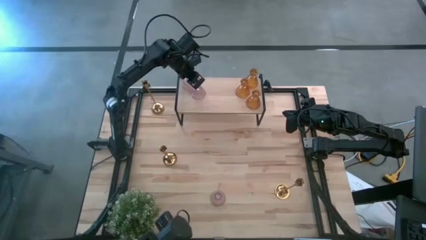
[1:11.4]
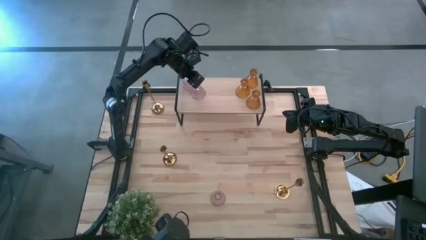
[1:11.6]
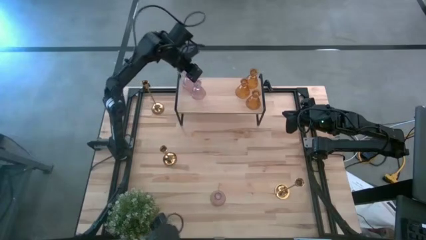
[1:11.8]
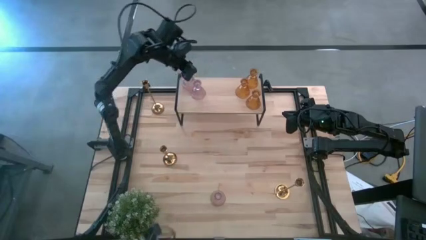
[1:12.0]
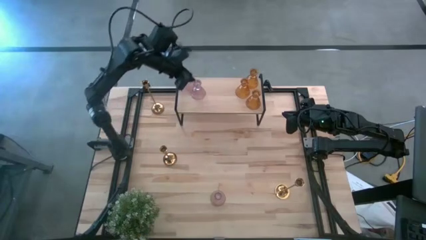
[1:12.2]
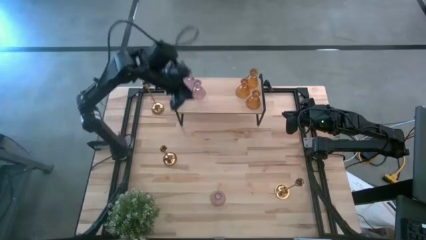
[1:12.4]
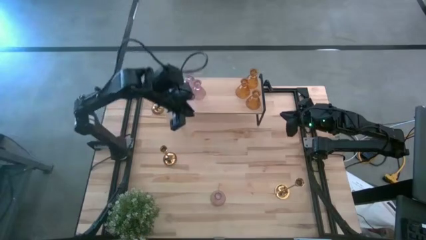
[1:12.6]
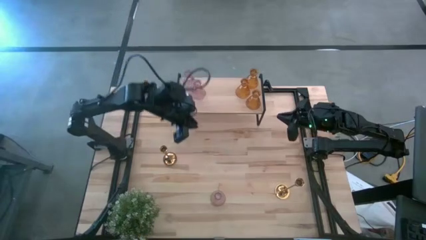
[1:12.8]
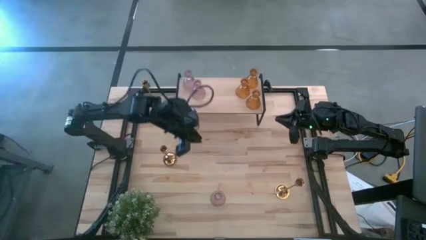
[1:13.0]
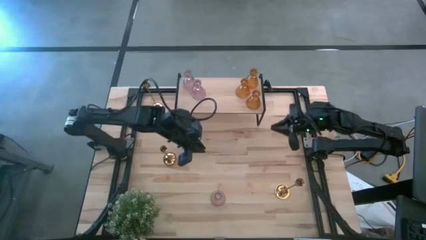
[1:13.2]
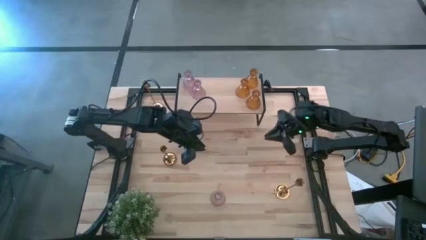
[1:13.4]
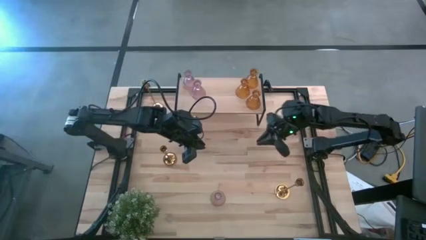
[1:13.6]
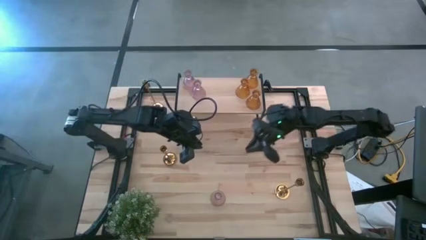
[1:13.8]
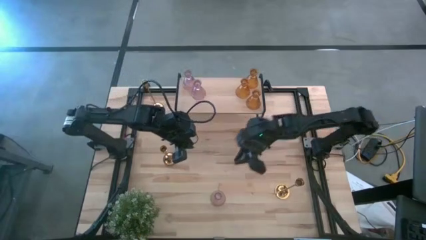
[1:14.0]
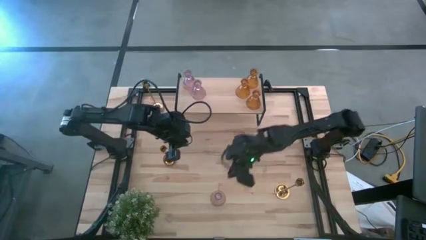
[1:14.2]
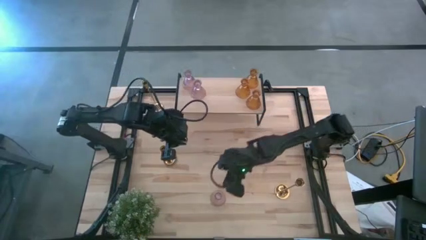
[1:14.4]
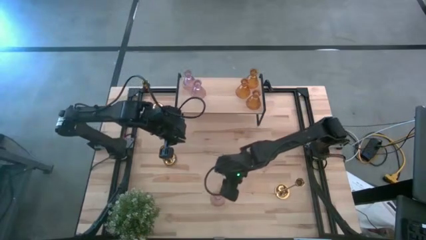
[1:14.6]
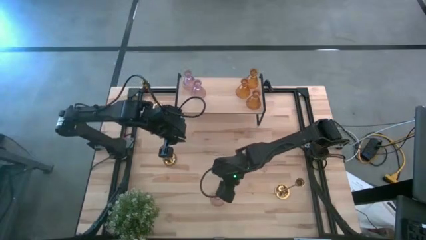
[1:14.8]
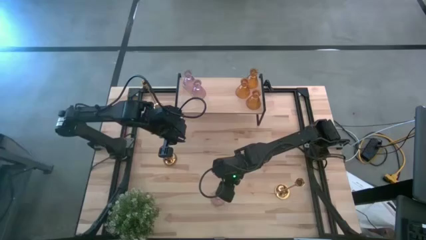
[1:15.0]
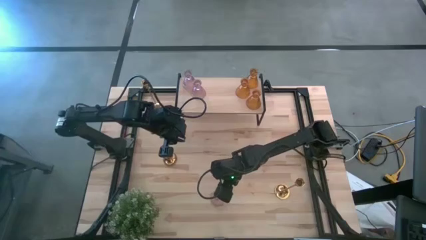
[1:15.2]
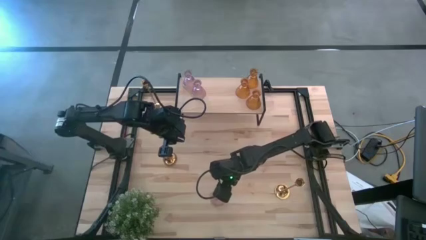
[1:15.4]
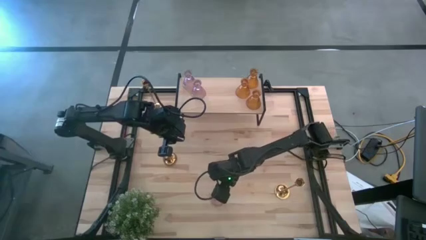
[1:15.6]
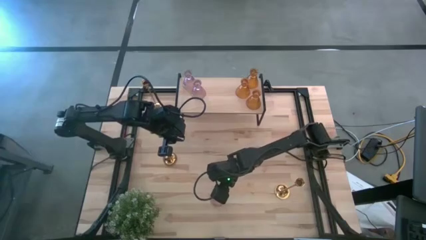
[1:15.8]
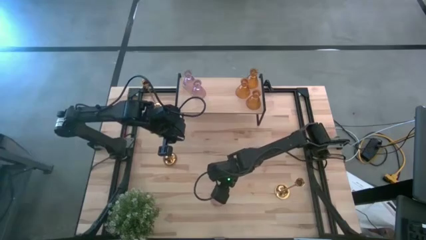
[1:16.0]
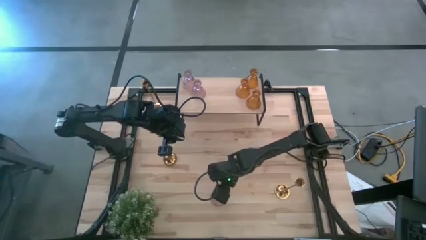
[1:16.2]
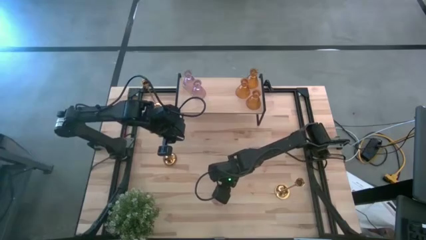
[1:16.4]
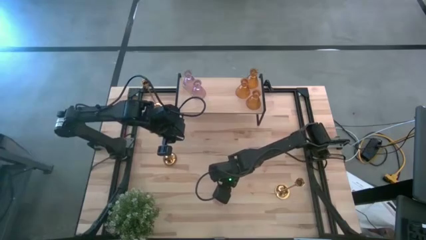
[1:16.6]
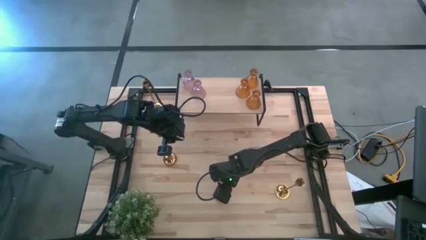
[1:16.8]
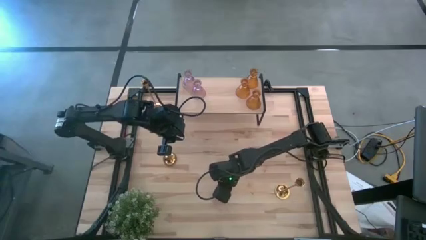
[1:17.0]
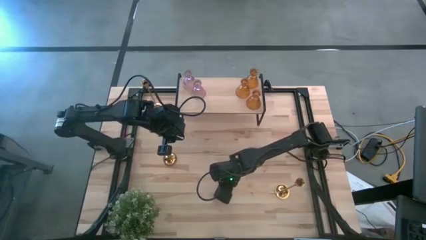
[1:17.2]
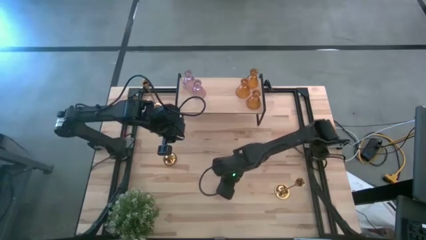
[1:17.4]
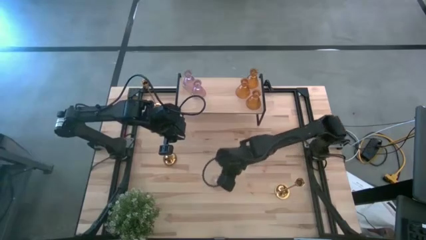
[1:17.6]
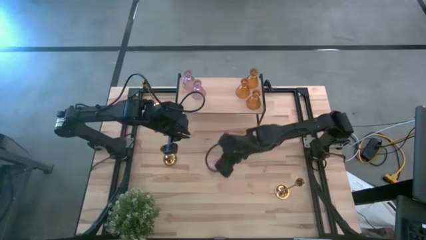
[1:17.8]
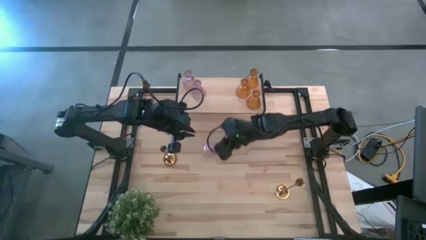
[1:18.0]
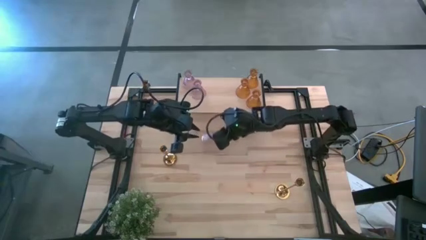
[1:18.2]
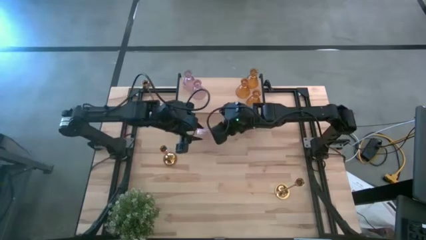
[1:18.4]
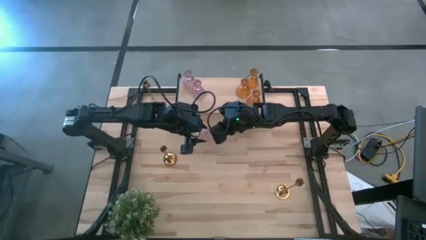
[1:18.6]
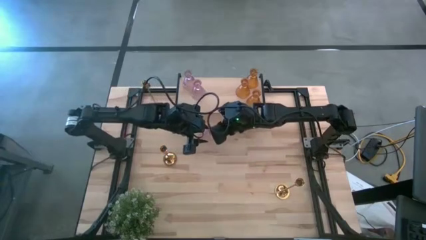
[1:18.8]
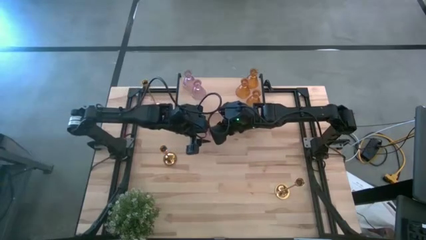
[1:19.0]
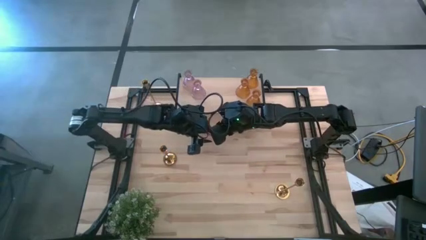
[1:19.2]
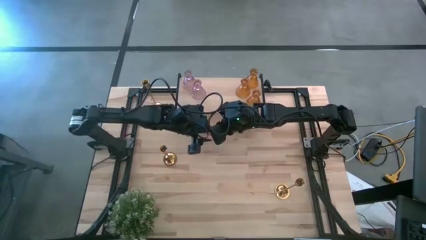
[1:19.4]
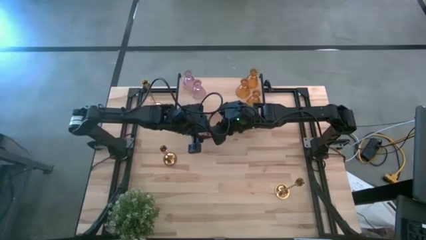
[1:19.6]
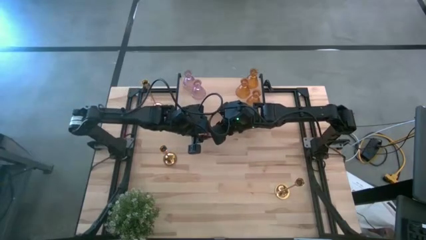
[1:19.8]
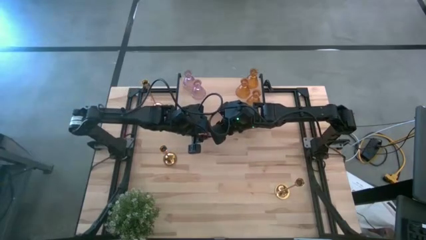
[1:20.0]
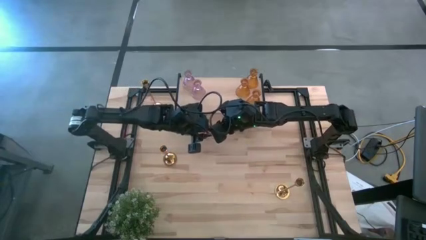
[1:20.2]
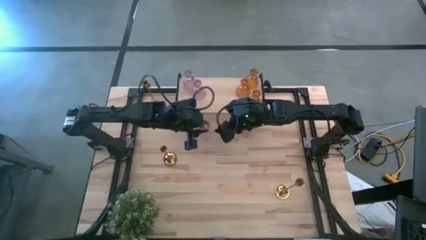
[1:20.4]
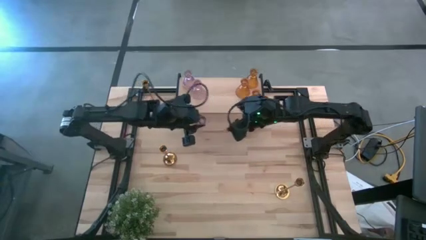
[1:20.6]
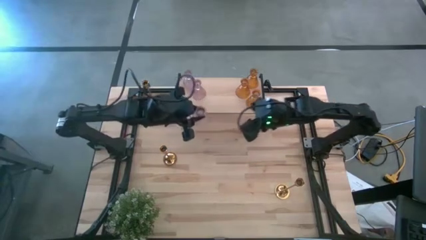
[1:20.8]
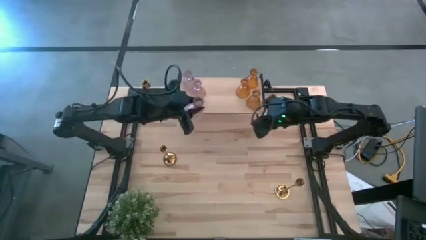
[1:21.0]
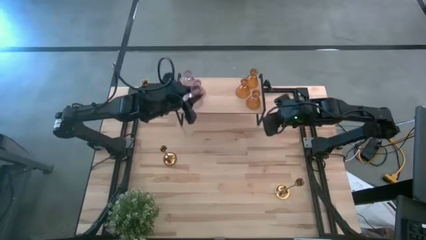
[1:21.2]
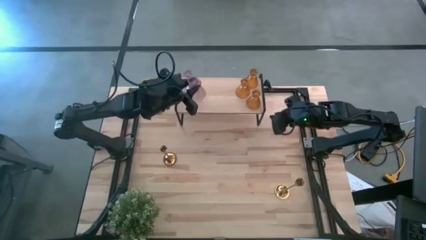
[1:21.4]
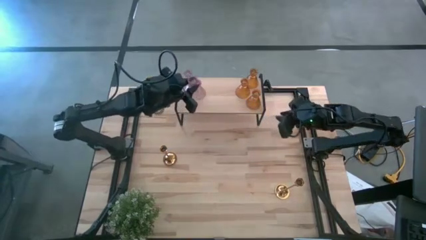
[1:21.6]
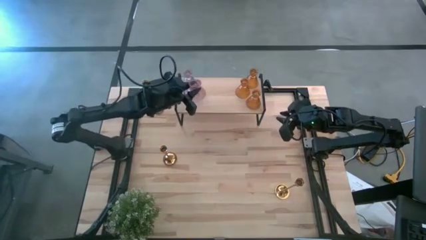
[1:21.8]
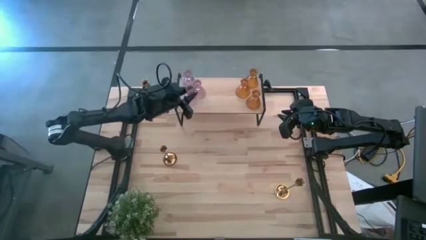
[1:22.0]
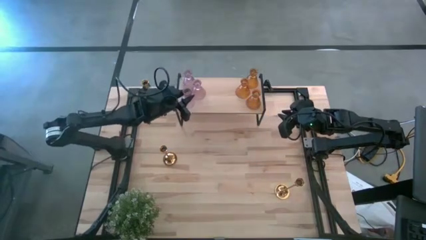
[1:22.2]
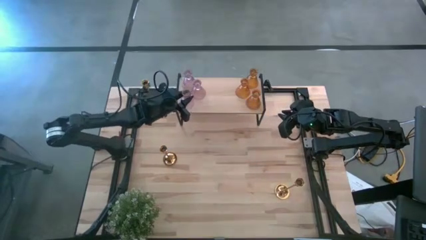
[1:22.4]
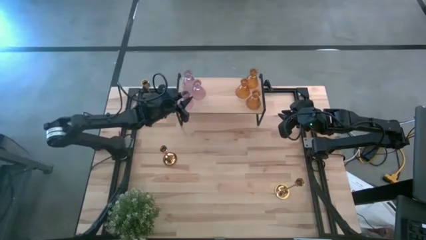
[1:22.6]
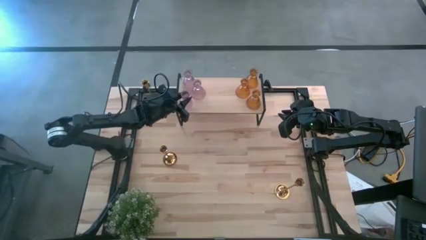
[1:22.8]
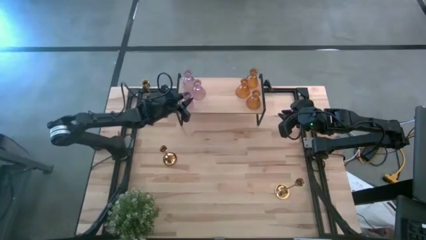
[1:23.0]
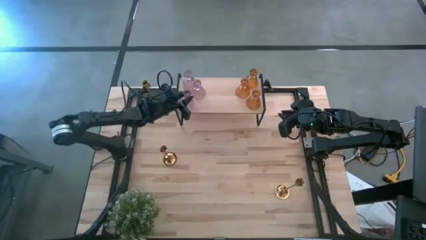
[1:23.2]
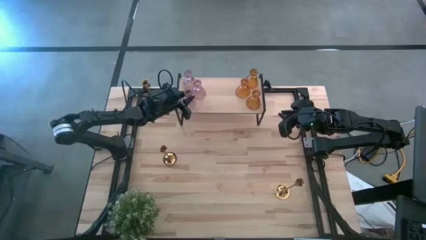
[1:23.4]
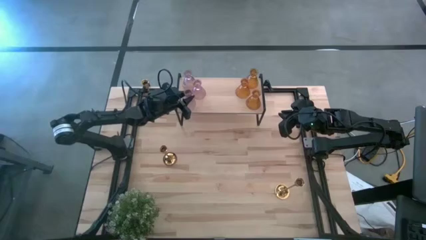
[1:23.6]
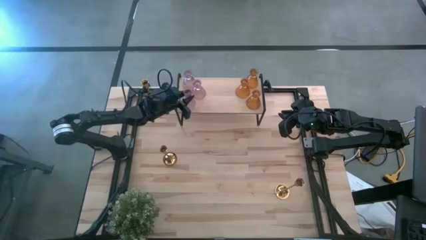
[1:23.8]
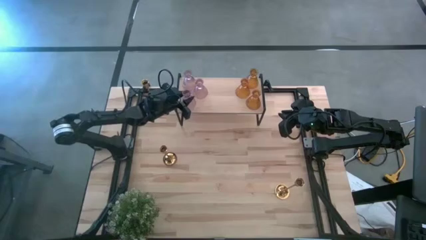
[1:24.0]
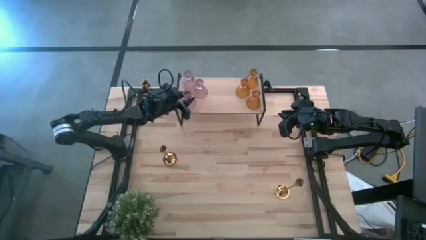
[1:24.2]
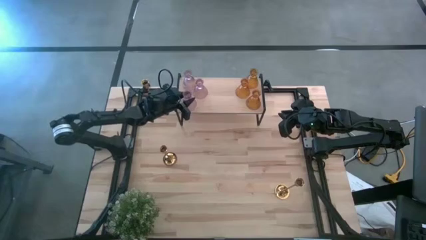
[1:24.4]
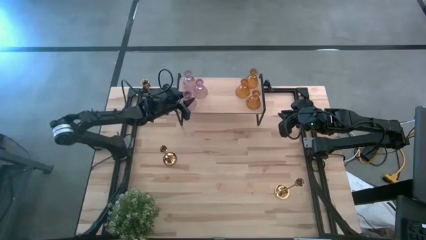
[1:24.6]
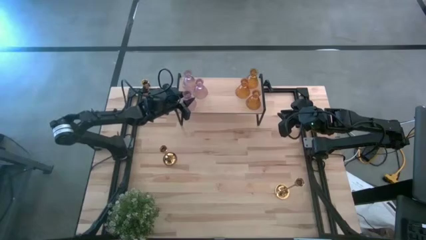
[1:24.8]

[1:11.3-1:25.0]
Task: Pick & Place candle stick holders
Align the purple glass candle holder with the other purple glass candle holder on the shelf

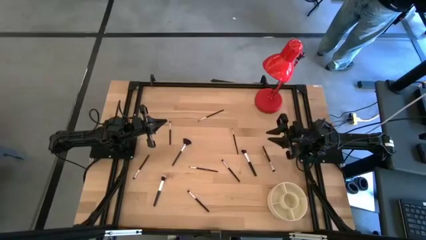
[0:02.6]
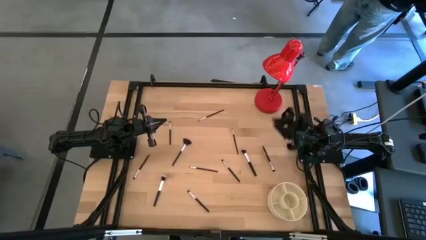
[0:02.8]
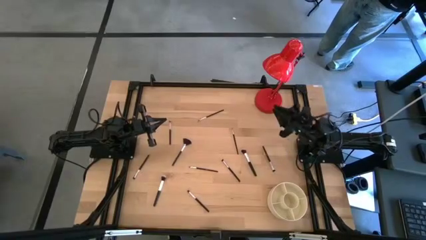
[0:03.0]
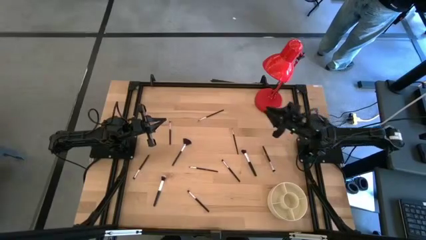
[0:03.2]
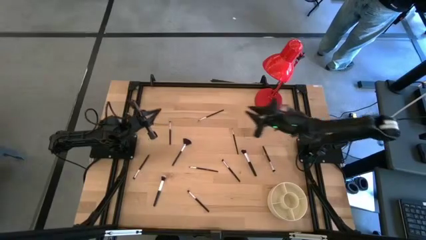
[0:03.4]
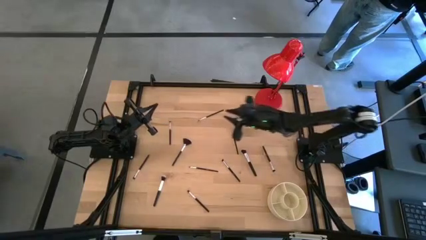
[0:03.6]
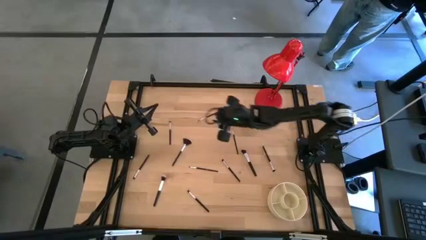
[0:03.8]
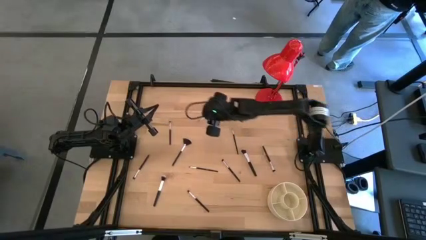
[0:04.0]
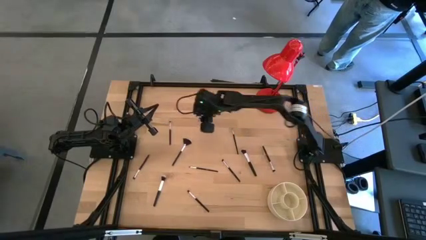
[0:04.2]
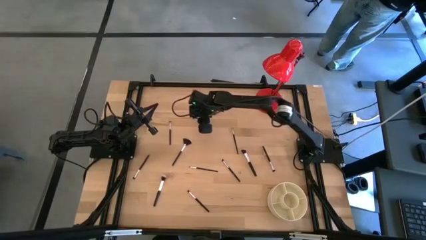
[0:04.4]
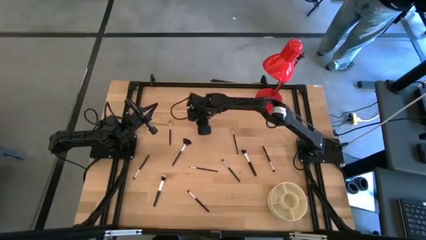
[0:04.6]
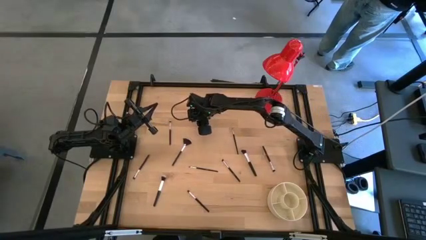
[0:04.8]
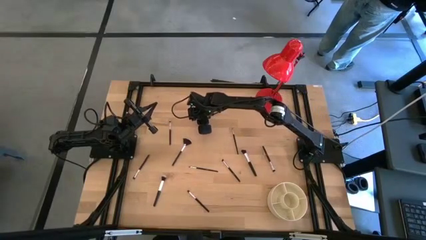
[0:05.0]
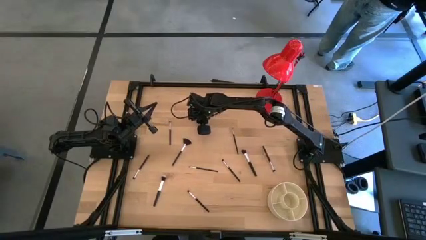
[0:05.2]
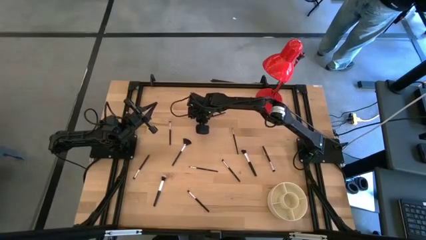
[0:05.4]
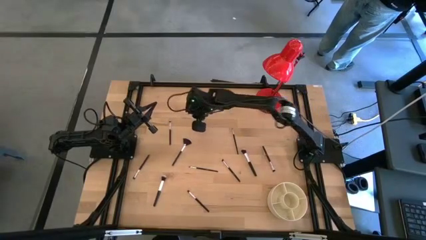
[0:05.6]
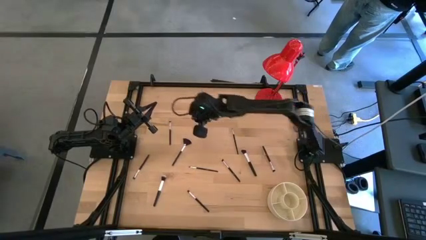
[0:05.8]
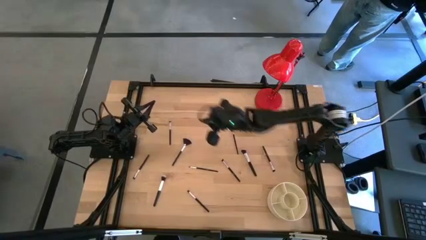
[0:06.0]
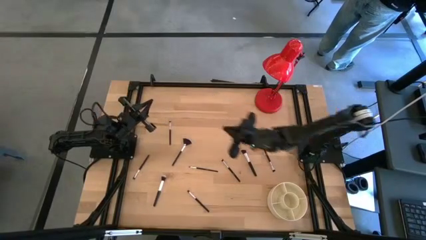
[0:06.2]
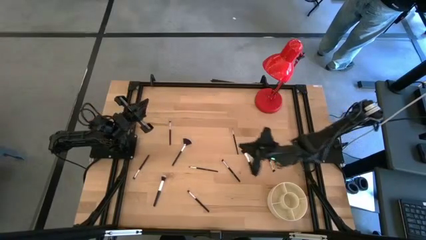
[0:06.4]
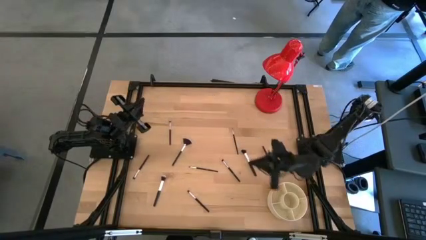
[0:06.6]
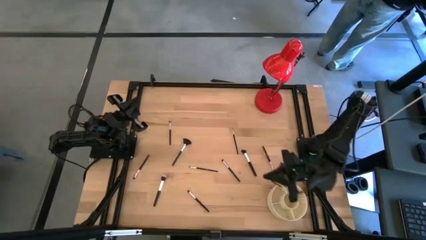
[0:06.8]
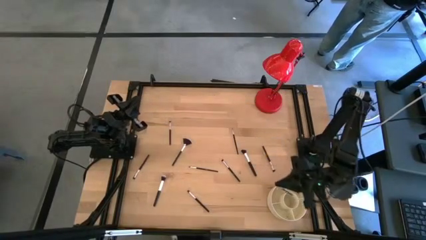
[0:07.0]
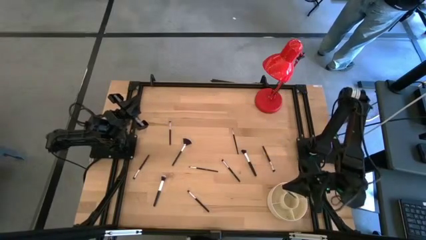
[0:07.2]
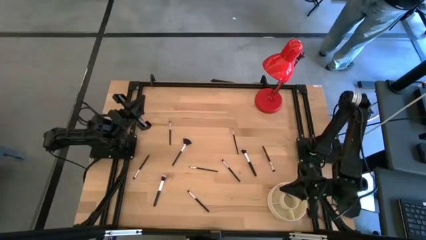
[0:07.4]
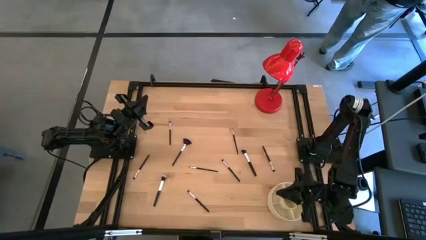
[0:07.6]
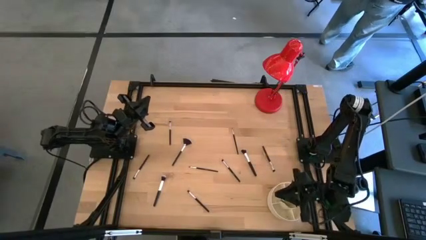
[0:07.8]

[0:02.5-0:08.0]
Task: Put items in baskets/containers
Put the black eyeshadow brush into the yellow pen organizer
